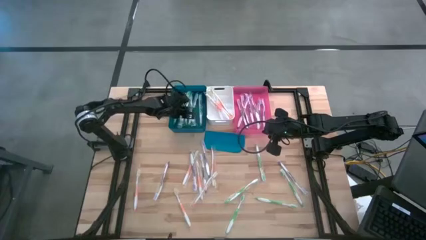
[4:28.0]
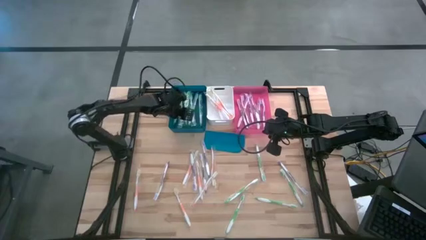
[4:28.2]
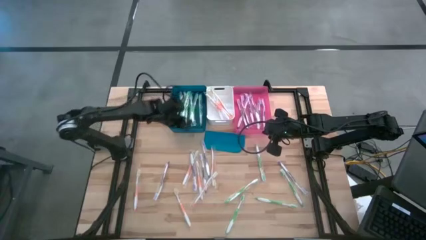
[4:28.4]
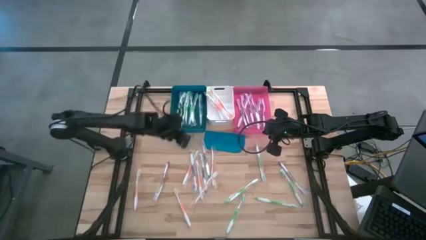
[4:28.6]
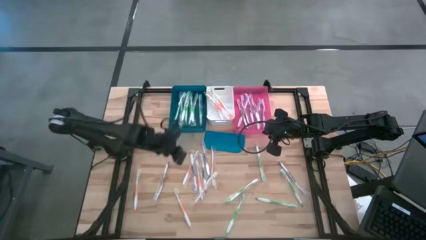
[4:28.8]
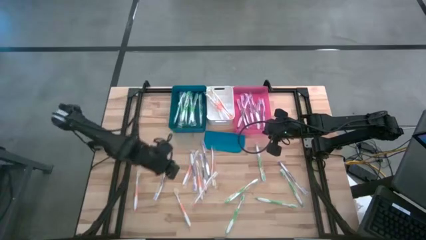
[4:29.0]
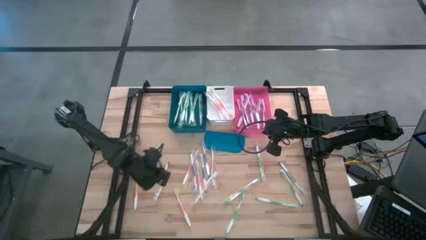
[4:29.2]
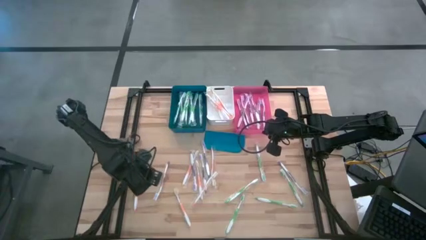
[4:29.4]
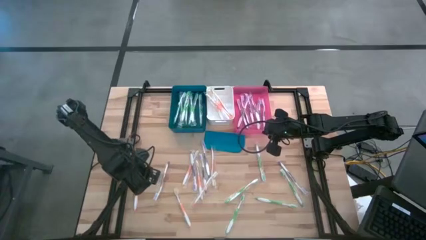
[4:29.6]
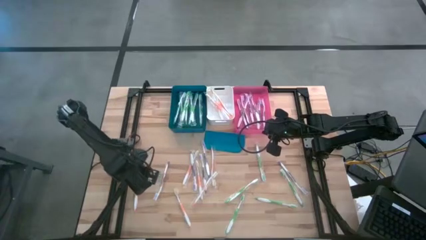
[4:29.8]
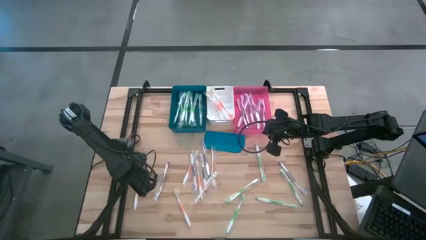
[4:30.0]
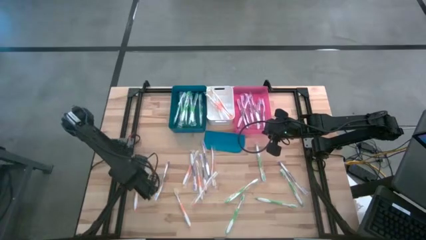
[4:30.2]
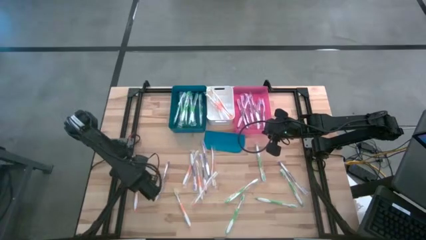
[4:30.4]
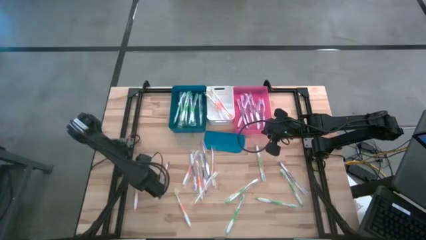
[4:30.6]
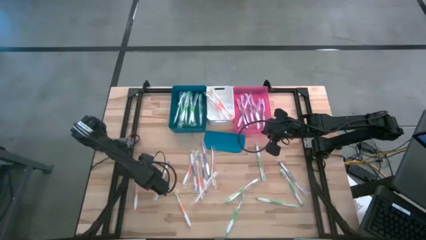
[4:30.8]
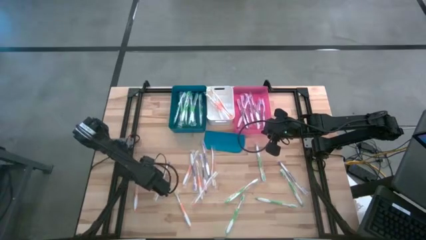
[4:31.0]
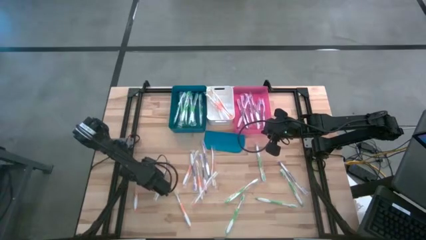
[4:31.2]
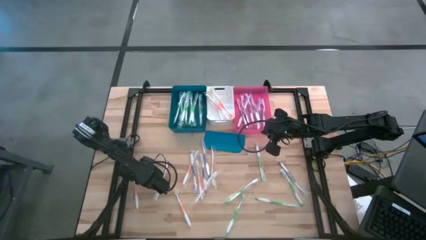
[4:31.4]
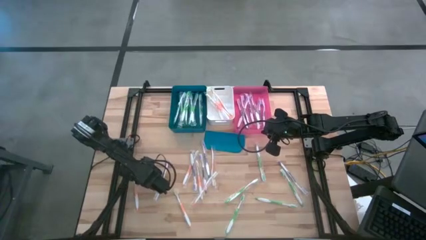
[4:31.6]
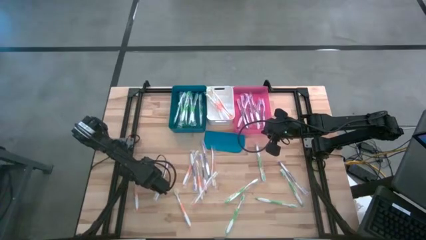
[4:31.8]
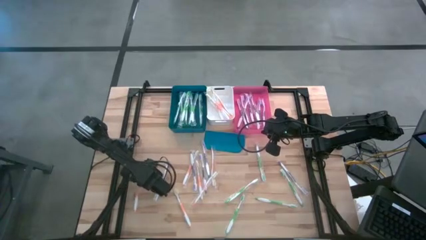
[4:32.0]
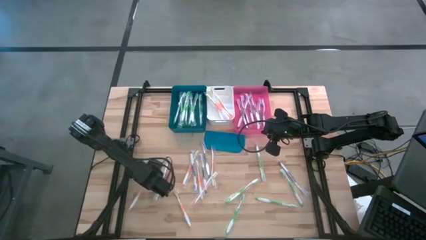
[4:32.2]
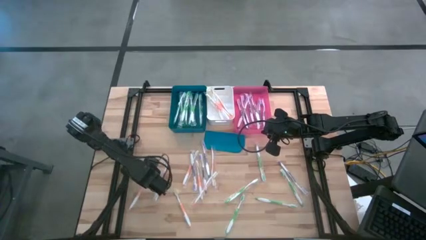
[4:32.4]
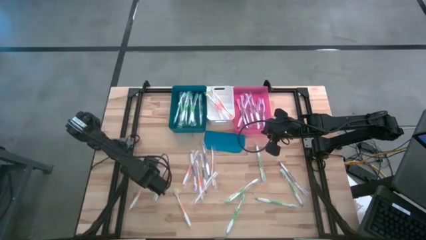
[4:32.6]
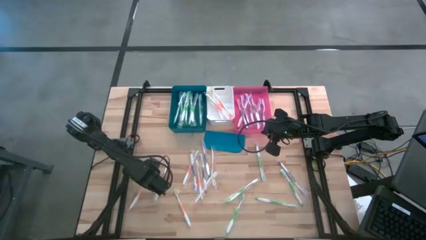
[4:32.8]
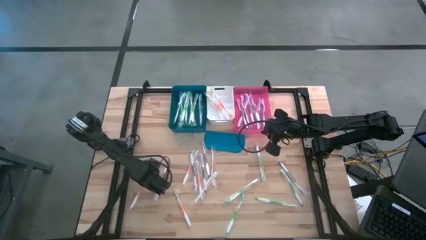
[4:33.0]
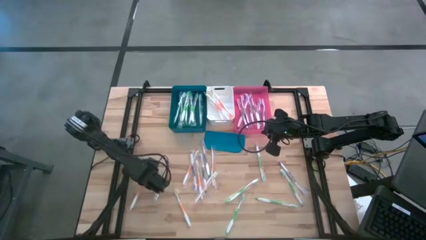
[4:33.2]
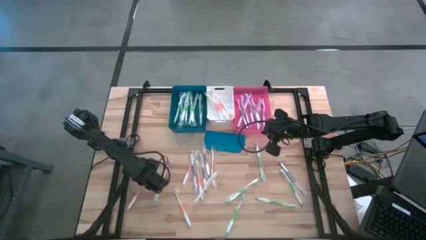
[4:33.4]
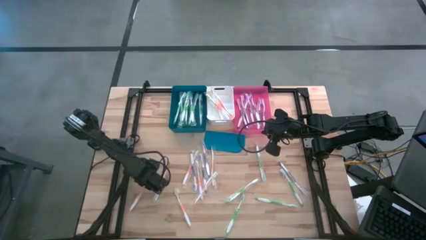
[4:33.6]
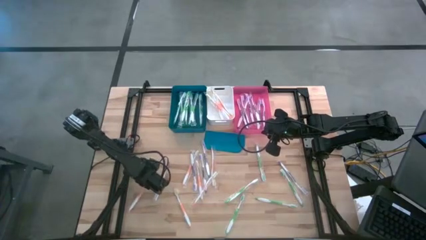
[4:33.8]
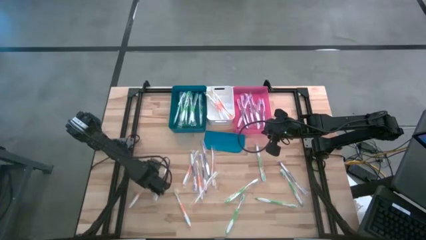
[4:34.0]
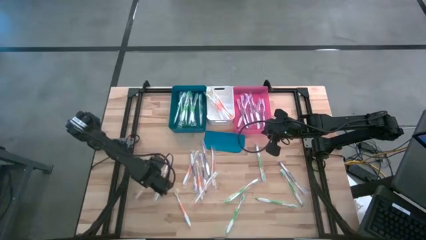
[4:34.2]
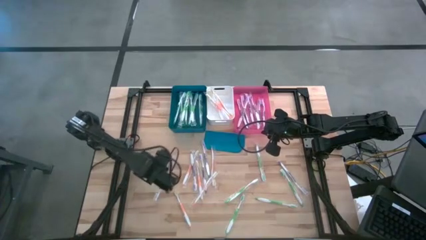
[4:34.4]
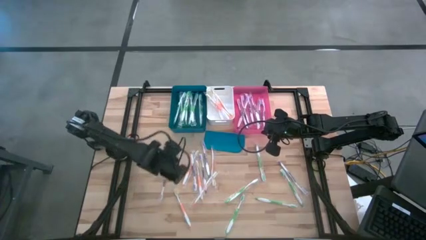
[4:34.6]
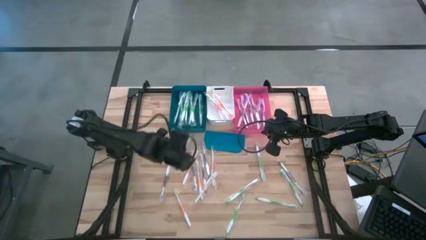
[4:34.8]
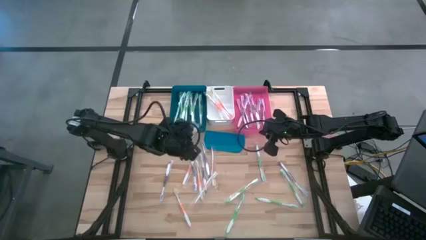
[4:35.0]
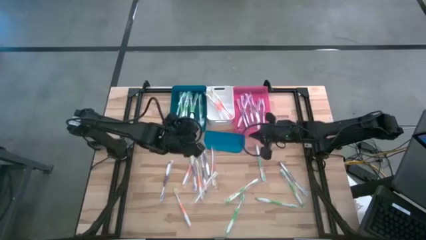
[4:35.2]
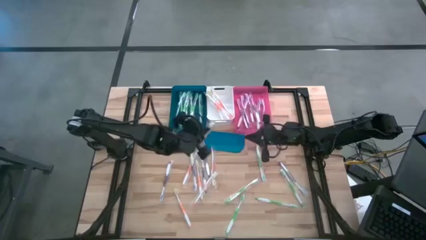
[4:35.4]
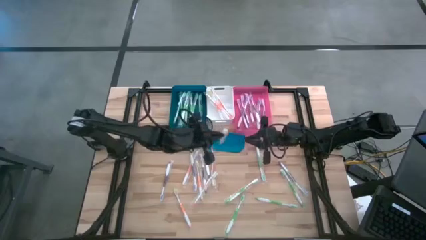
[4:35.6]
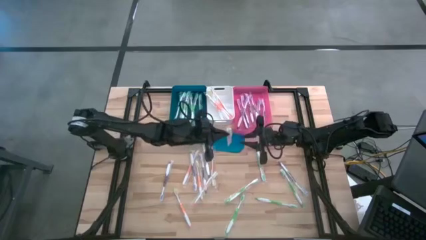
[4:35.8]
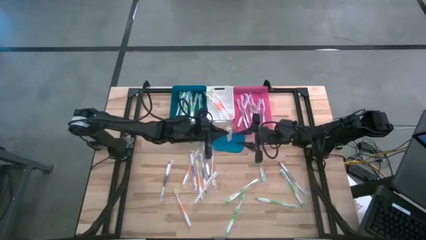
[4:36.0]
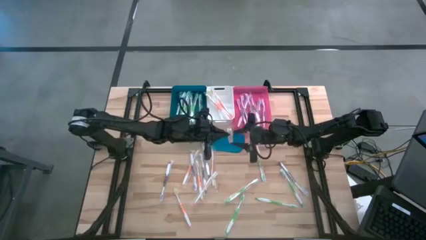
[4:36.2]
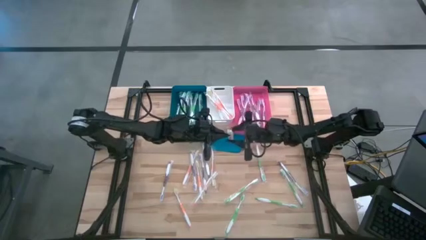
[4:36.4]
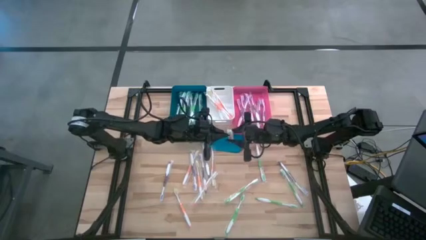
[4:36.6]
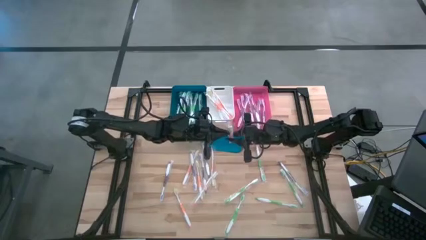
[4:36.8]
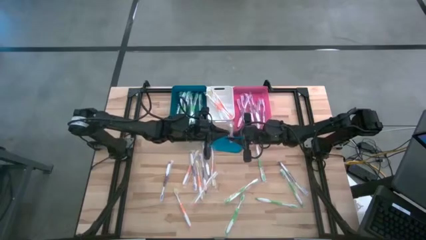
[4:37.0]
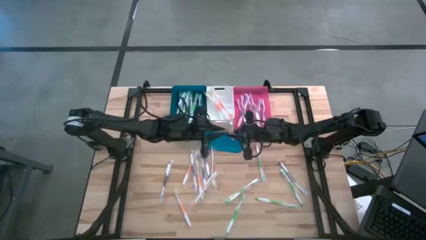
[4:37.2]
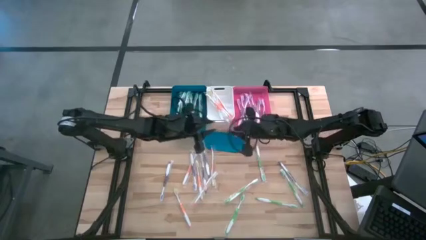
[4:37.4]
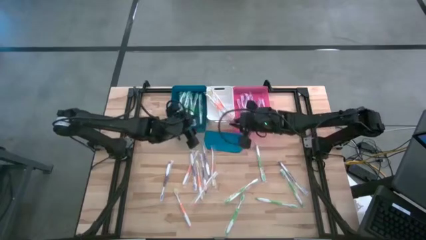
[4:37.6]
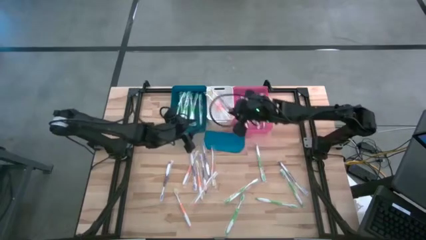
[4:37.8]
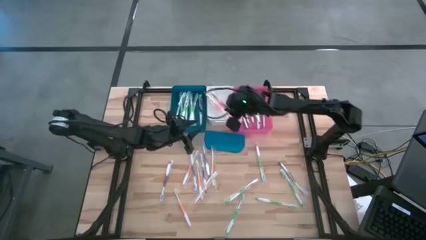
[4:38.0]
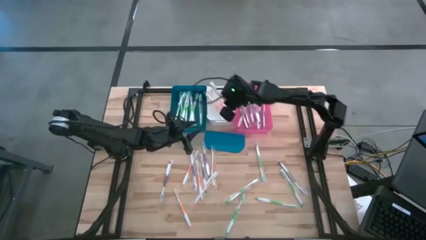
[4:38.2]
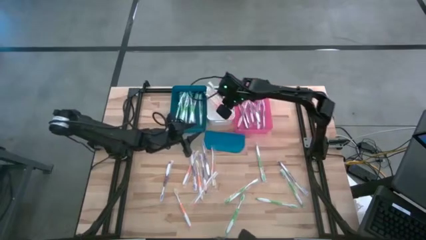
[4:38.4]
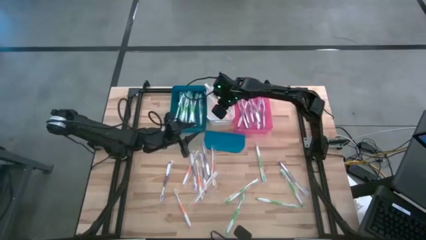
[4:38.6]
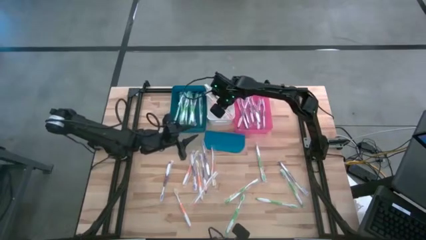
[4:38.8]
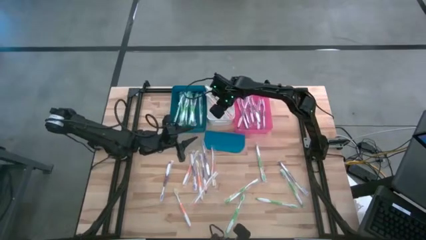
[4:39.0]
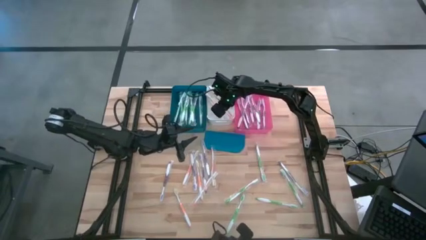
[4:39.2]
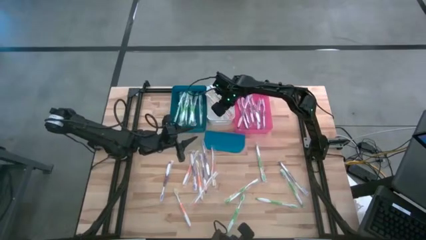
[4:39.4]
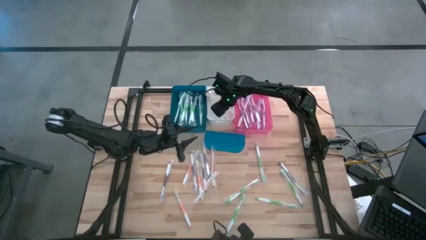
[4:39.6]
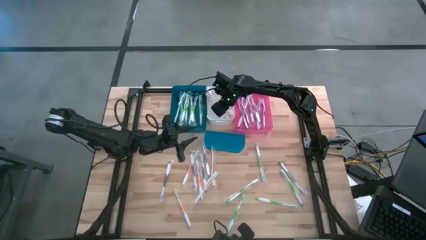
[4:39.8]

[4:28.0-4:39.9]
Task: Pick & Place Toothbrushes
Put the orange toothbrush into the white bin

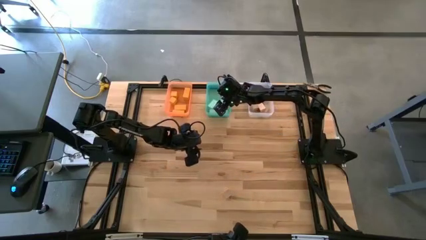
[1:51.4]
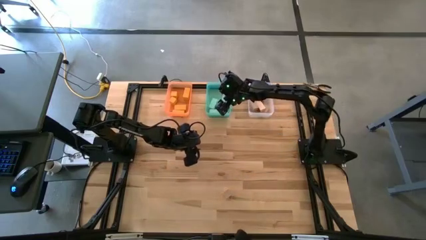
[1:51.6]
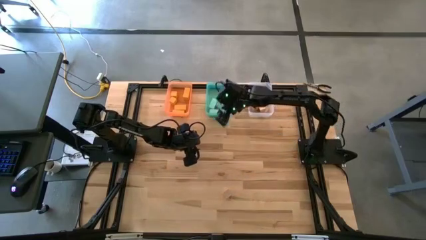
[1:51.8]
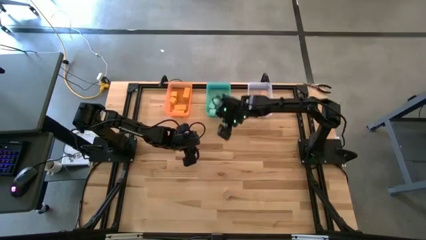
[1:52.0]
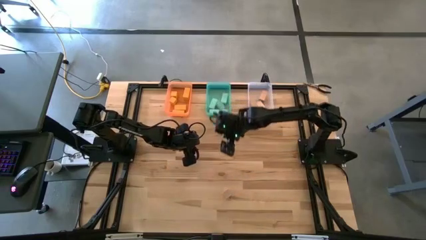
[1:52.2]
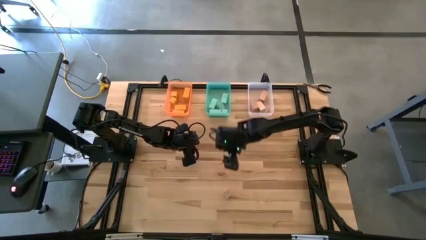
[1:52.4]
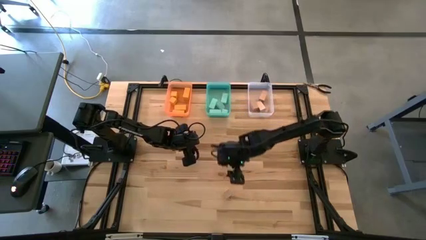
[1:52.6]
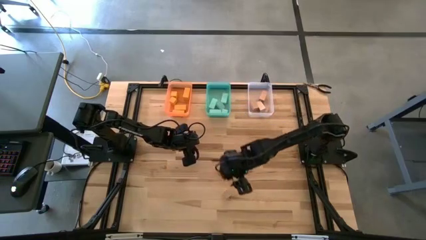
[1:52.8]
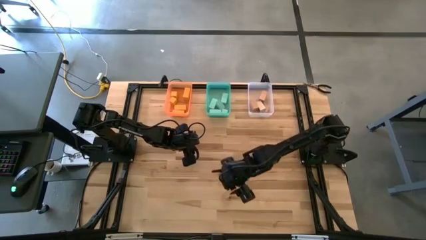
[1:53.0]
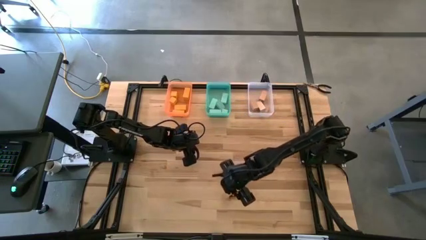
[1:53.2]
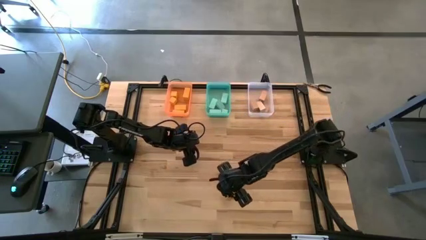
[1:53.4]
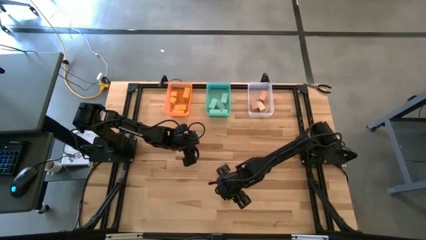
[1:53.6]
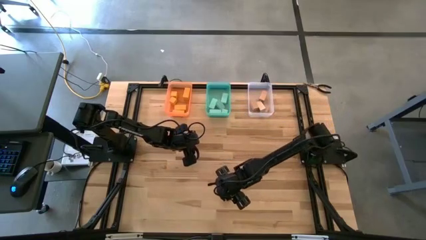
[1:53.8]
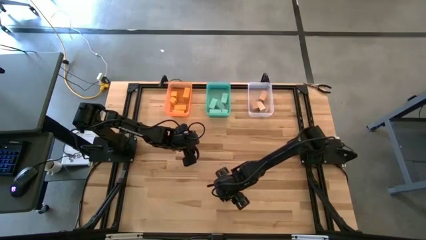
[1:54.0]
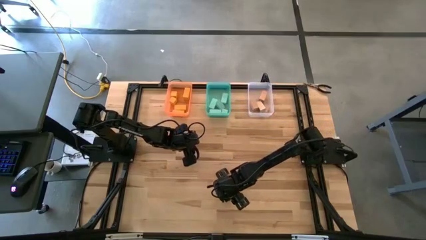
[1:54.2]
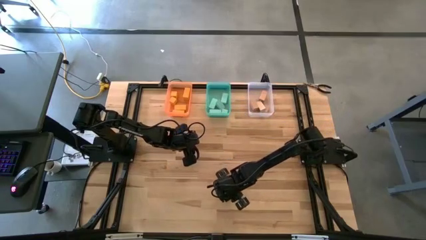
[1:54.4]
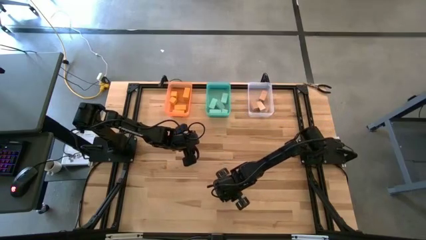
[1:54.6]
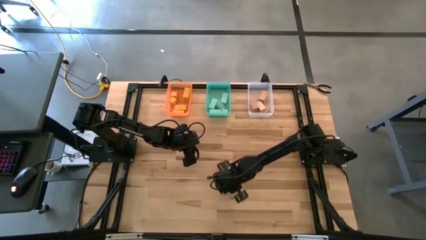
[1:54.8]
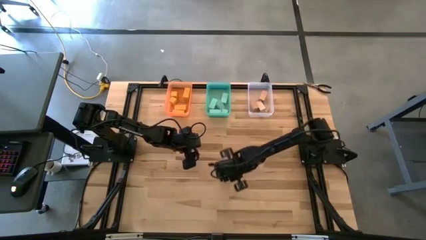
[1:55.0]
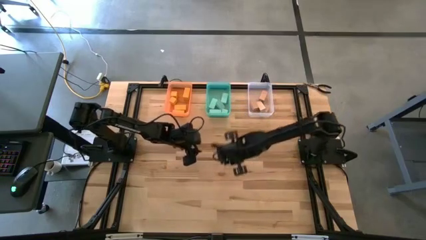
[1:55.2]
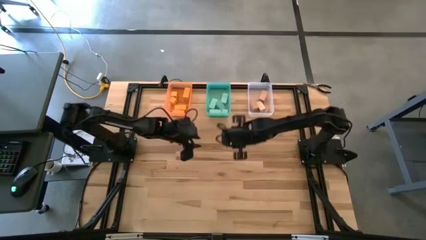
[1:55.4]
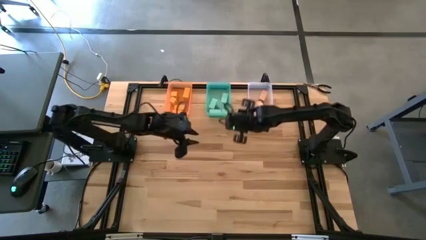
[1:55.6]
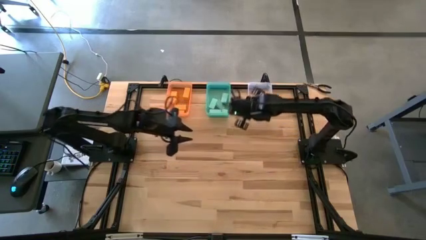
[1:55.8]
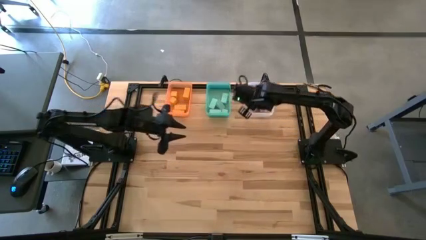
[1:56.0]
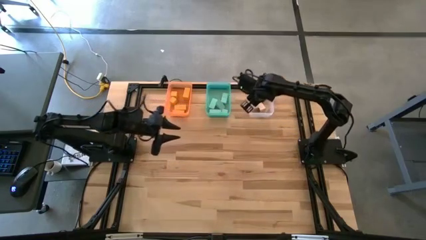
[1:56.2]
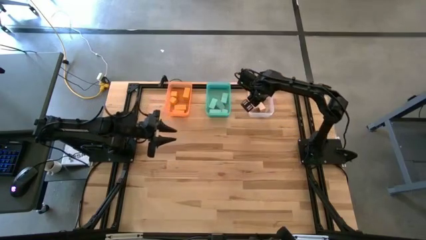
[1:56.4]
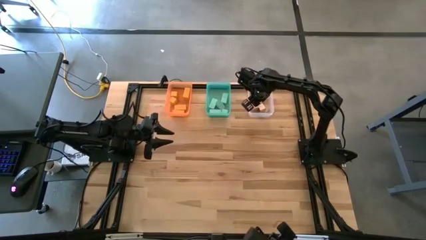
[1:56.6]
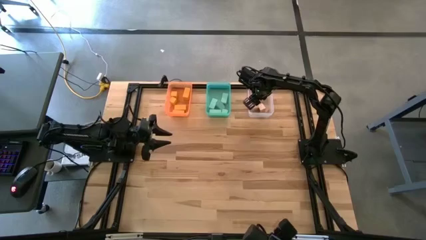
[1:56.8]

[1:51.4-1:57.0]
Task: Sort & place blocks by color
Put the brown block into the transparent bin
